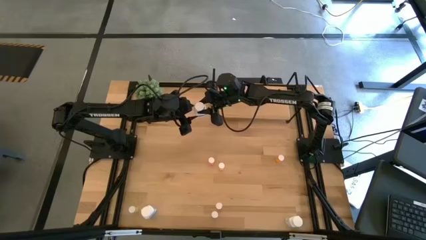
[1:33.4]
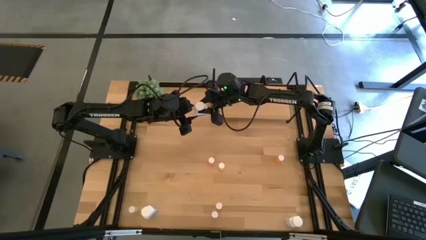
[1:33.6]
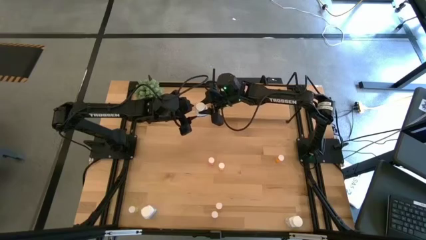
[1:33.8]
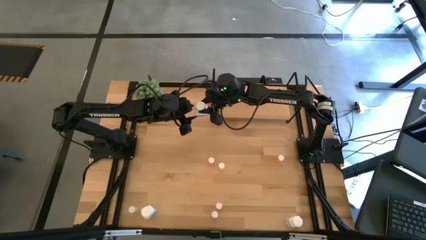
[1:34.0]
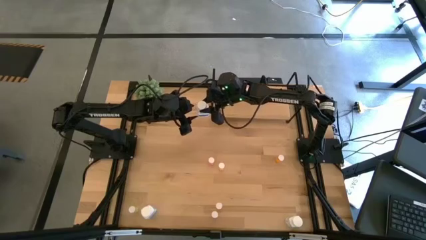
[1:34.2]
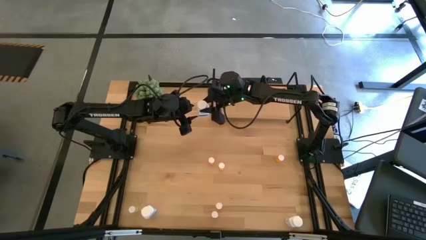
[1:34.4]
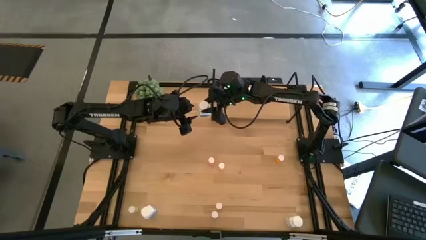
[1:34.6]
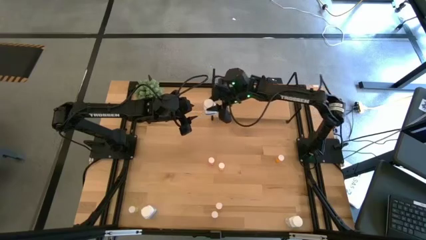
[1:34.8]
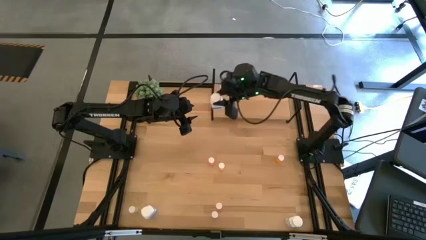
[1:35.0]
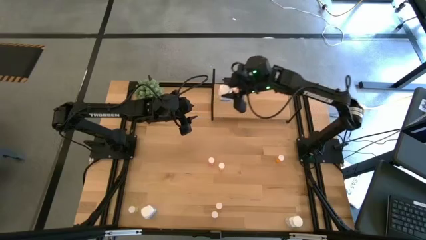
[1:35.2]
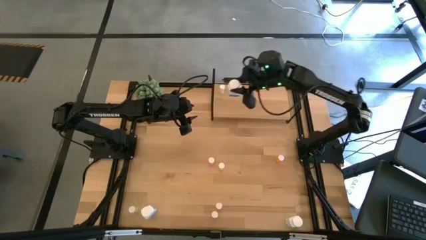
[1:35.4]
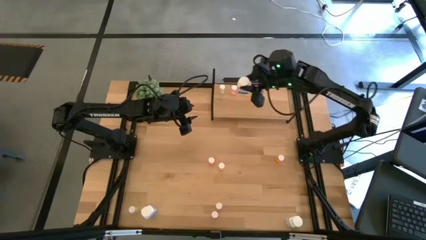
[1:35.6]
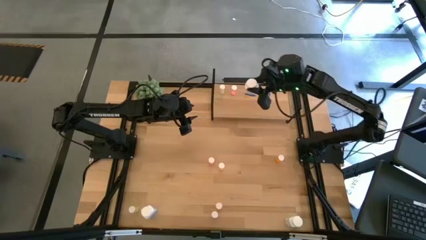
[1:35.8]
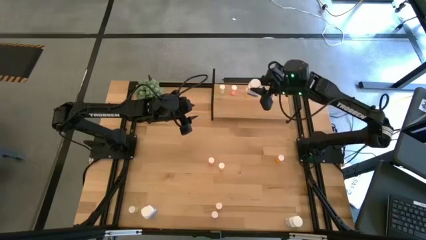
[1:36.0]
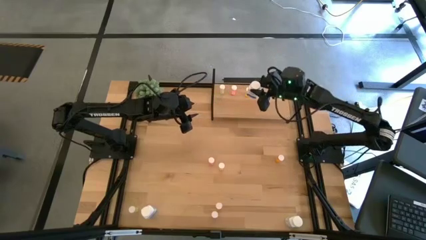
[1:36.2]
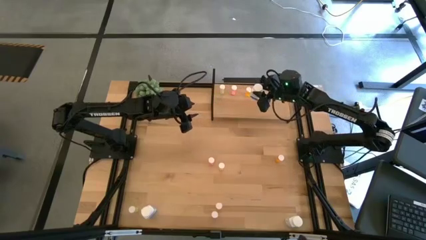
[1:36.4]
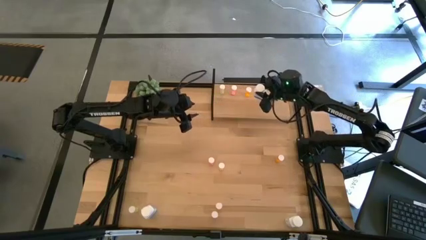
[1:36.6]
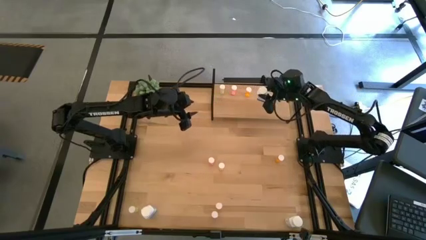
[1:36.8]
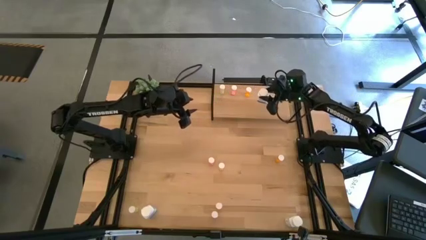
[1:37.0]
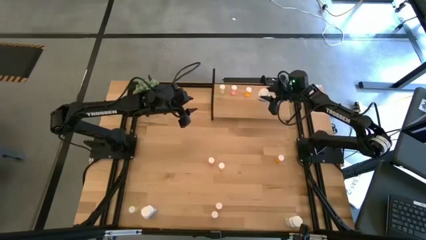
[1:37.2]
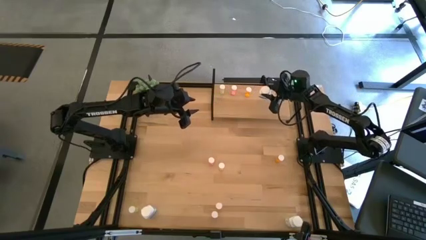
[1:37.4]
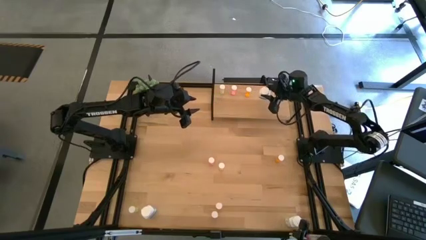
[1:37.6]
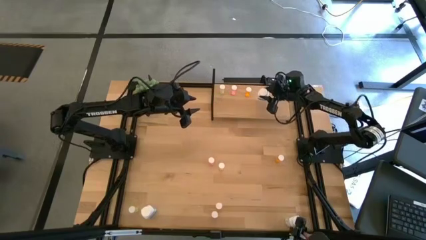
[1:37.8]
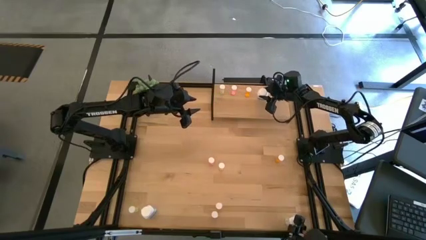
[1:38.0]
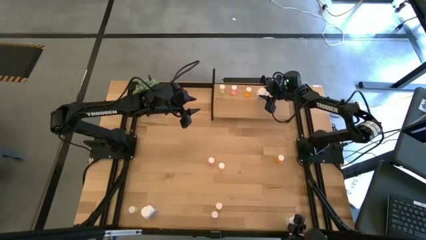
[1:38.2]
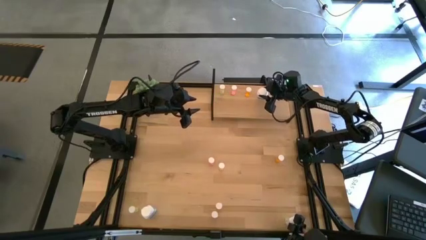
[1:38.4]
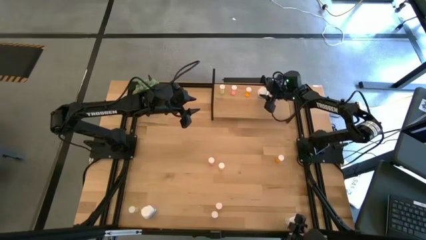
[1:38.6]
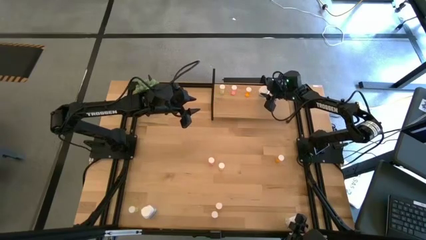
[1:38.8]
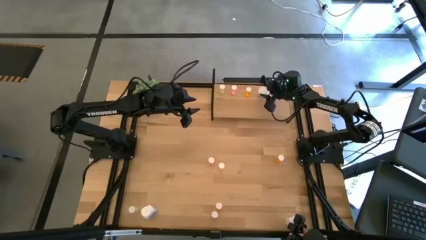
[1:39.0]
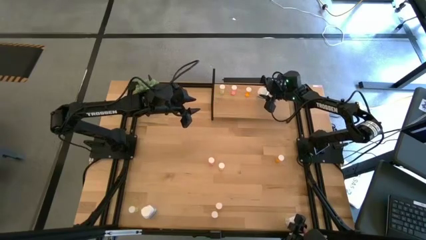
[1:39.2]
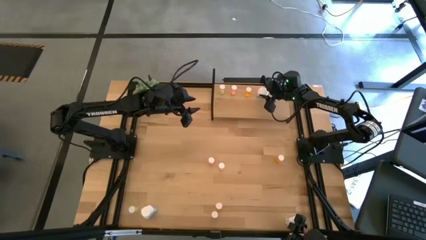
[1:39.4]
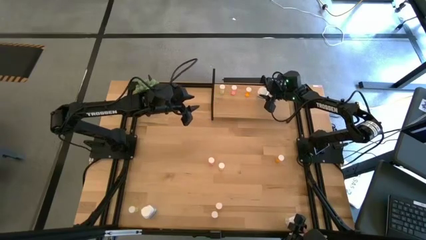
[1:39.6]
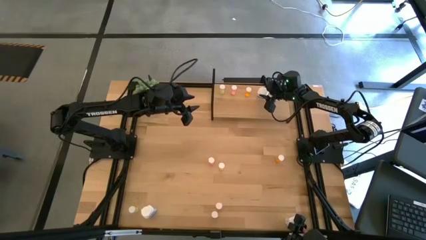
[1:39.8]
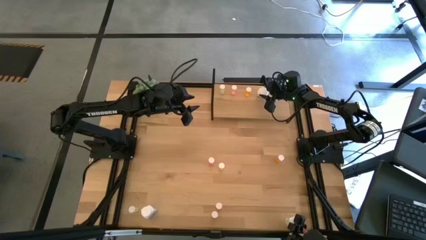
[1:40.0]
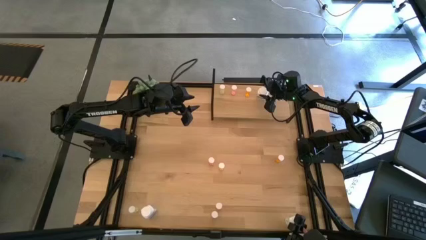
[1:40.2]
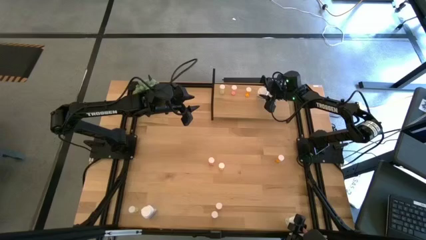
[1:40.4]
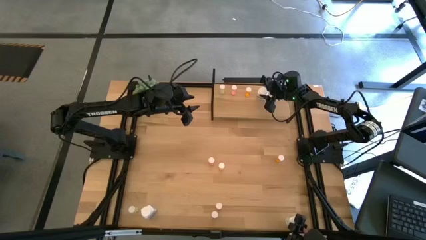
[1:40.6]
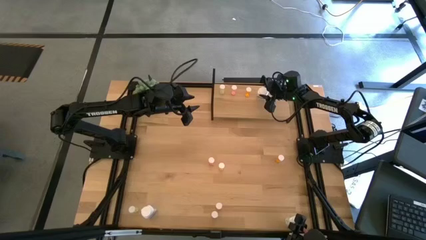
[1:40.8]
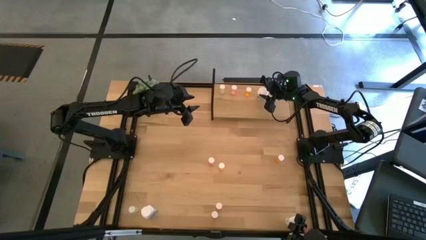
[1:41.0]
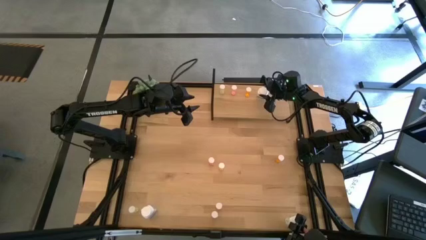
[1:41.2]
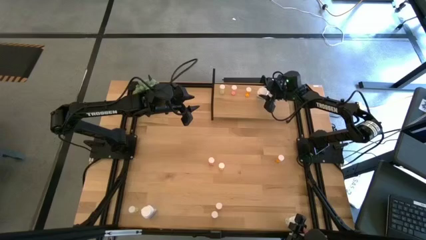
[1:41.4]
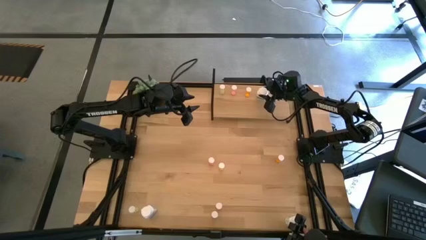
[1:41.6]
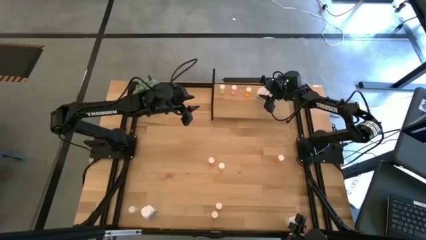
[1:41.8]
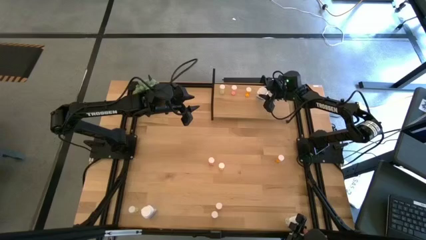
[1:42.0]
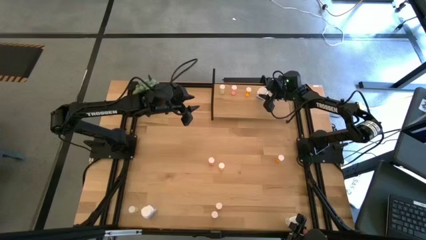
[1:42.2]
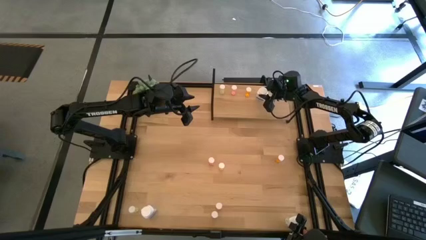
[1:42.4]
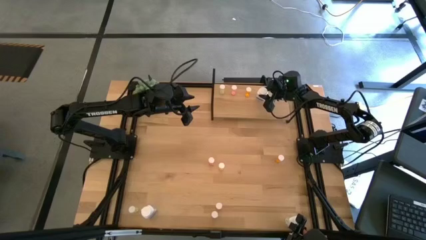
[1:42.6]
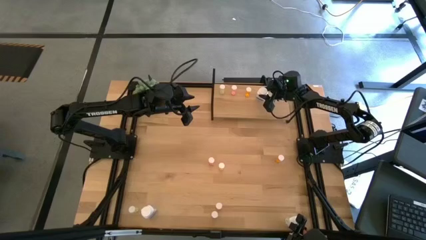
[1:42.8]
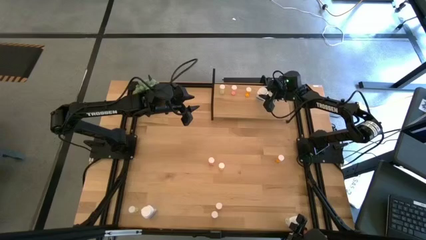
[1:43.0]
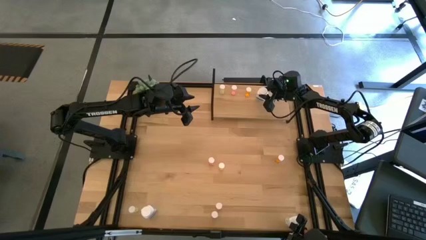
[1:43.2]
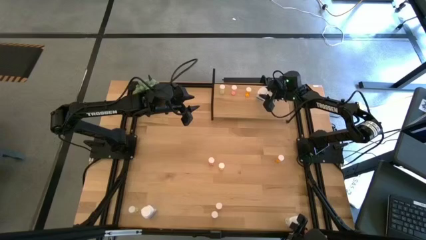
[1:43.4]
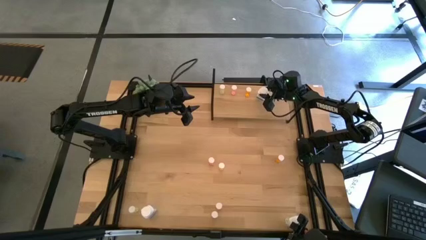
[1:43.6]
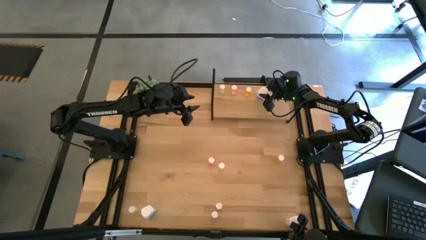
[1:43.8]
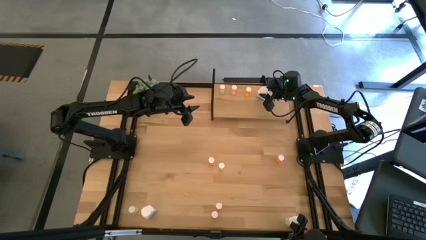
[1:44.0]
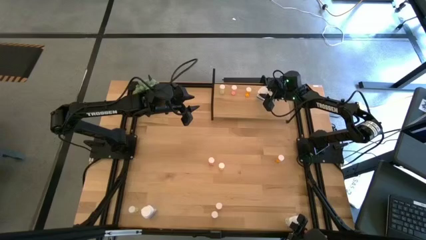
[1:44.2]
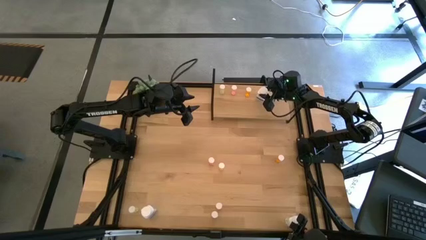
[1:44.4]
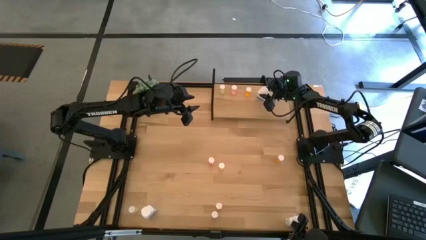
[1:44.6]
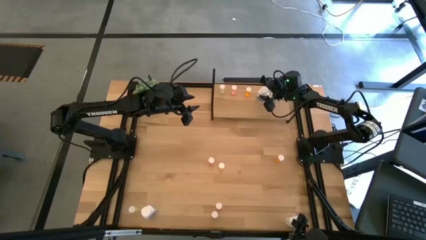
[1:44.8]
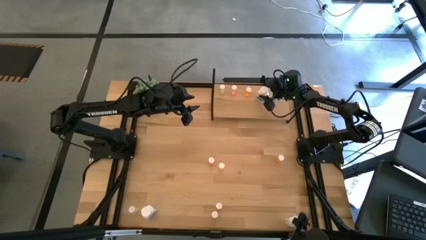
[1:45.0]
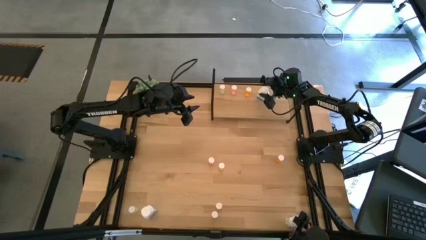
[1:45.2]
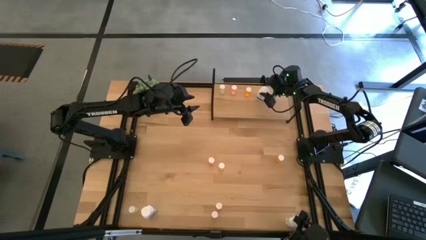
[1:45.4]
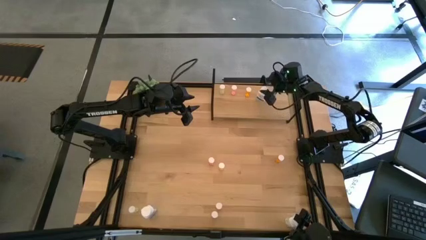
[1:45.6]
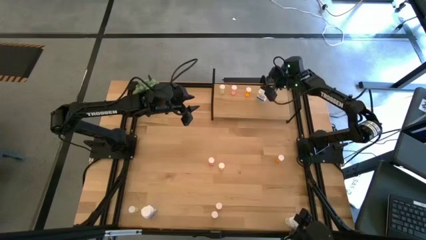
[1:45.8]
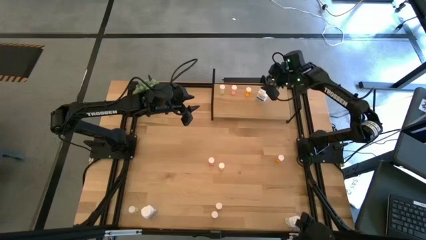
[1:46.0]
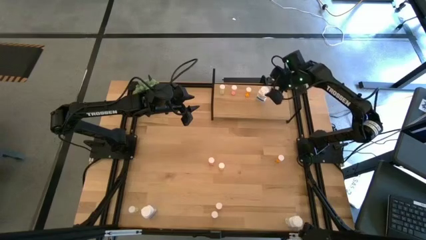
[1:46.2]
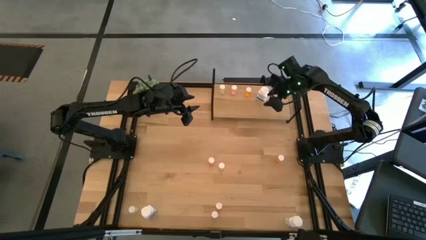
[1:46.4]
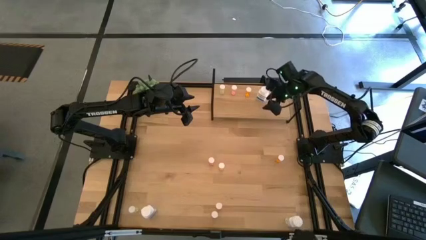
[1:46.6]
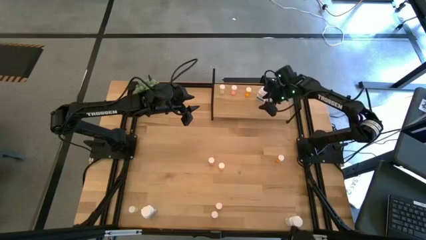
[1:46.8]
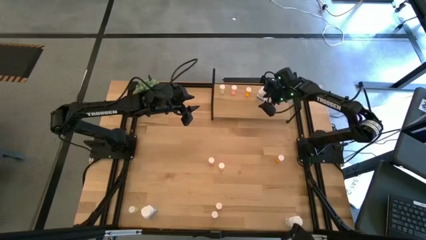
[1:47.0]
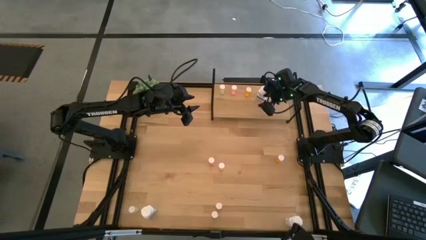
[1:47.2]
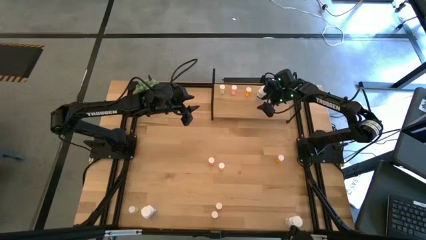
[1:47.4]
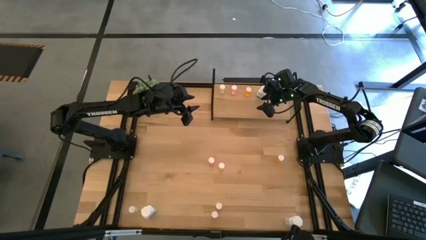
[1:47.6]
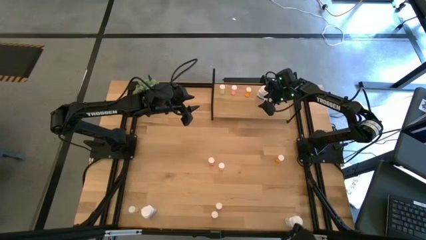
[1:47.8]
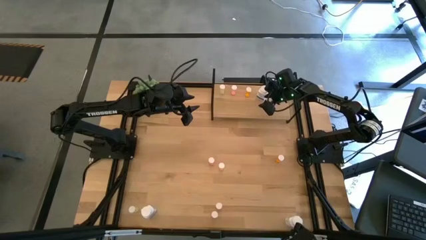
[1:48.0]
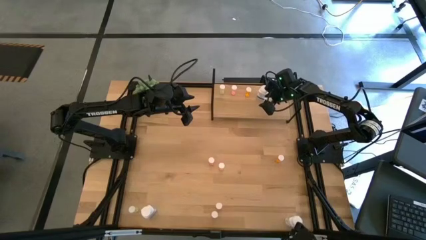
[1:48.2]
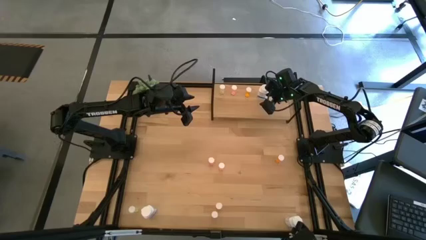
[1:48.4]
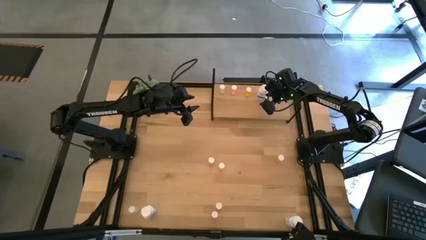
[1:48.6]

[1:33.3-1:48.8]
Task: Pick and place medicine bottles onto shelf by color
Put the top right white pill bottle on the shelf
